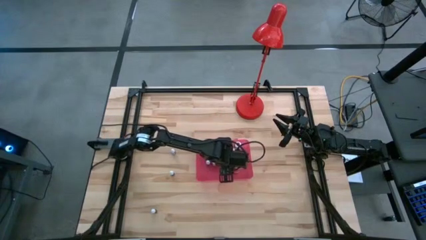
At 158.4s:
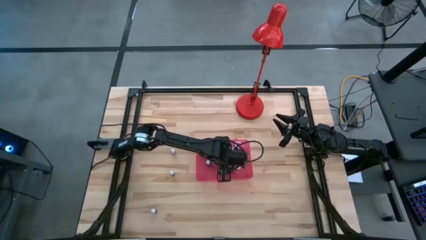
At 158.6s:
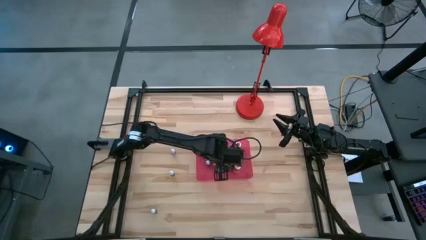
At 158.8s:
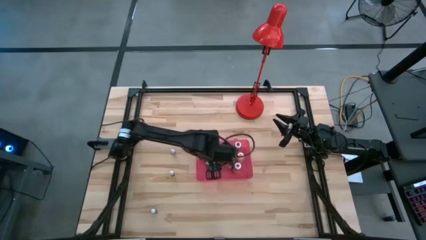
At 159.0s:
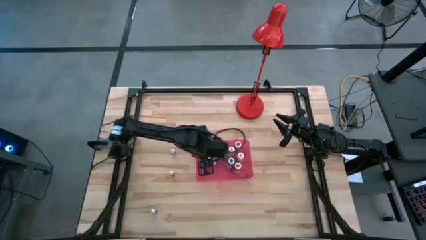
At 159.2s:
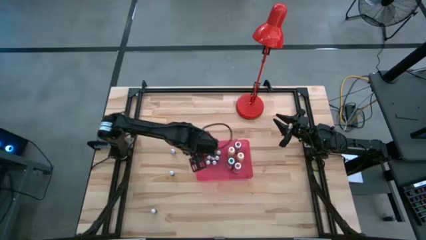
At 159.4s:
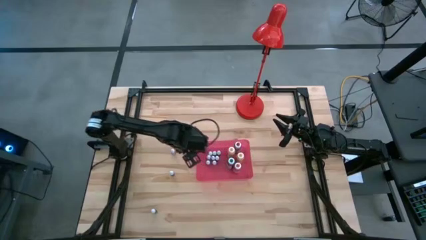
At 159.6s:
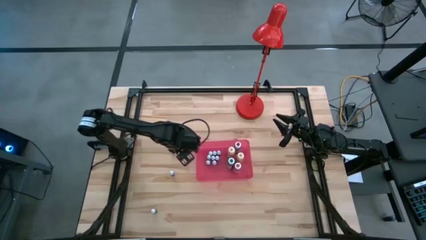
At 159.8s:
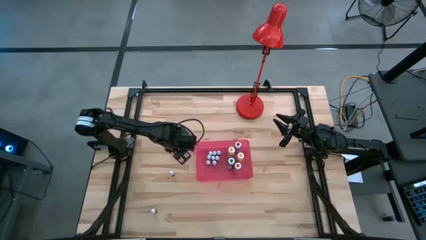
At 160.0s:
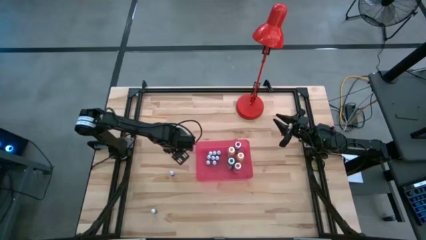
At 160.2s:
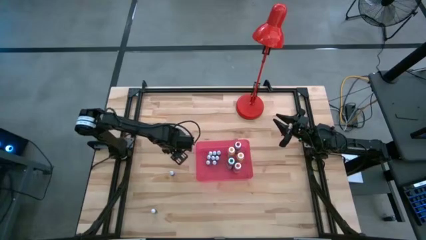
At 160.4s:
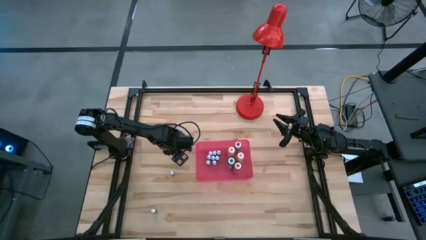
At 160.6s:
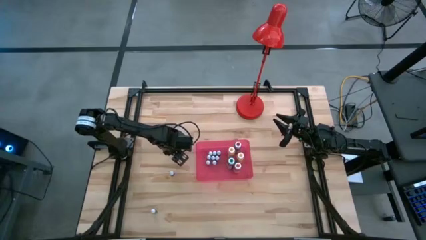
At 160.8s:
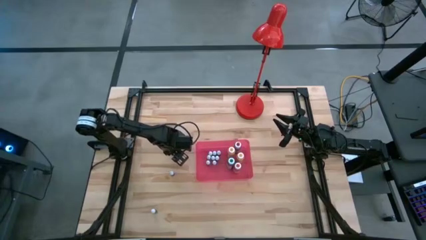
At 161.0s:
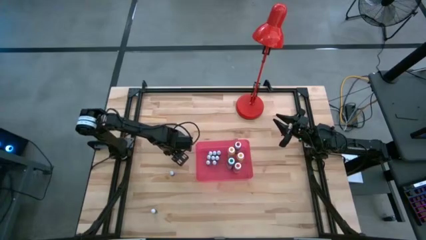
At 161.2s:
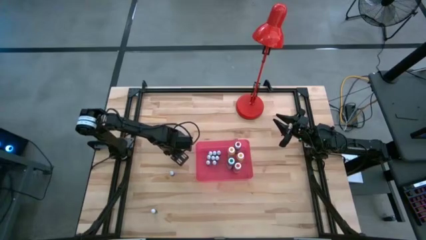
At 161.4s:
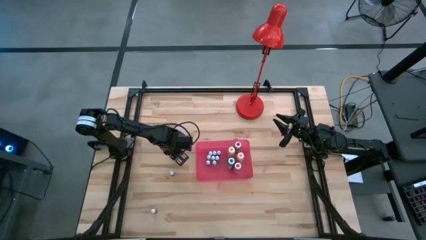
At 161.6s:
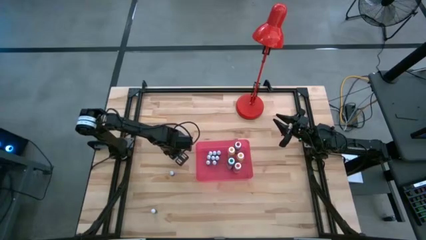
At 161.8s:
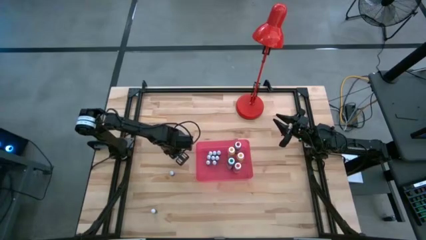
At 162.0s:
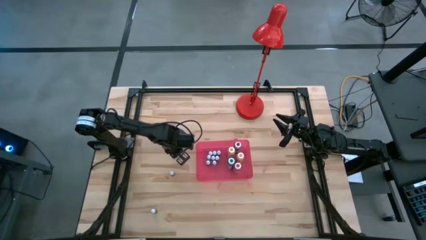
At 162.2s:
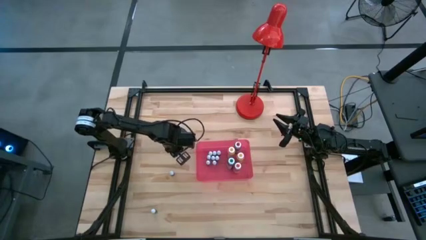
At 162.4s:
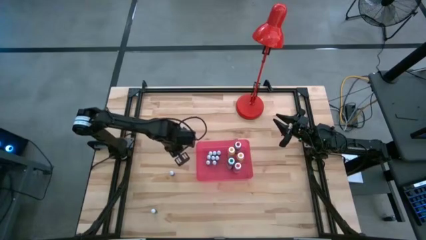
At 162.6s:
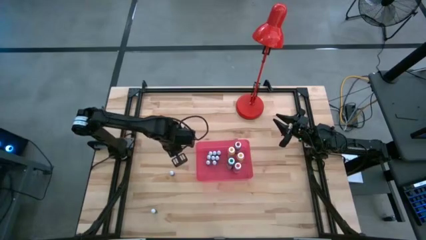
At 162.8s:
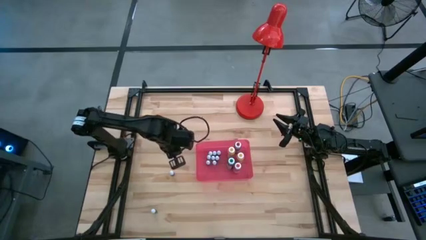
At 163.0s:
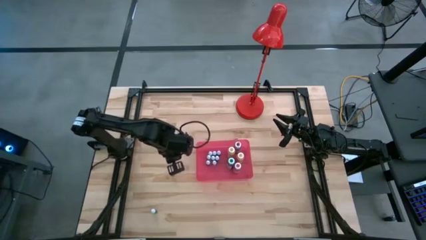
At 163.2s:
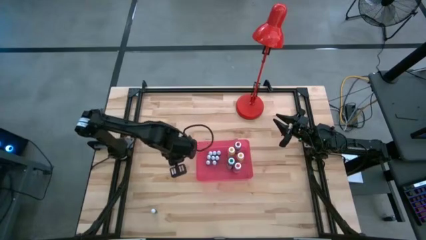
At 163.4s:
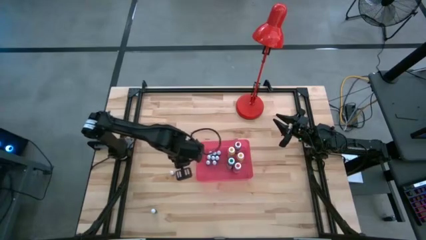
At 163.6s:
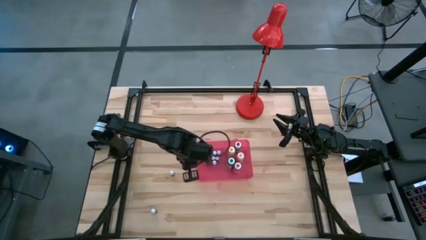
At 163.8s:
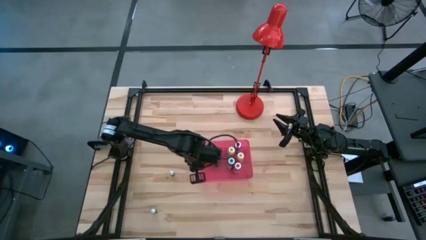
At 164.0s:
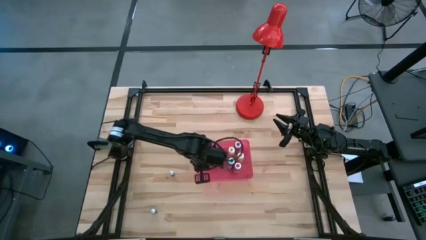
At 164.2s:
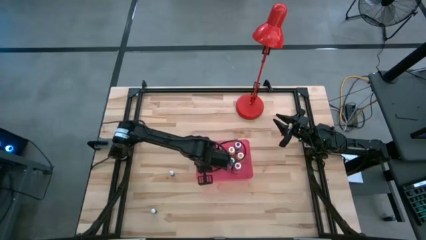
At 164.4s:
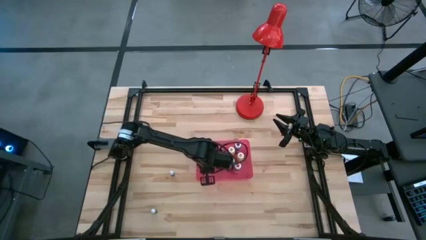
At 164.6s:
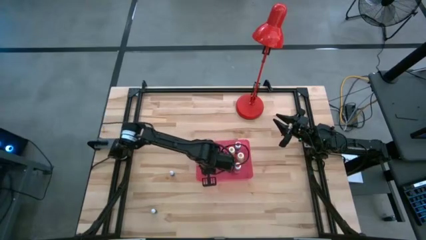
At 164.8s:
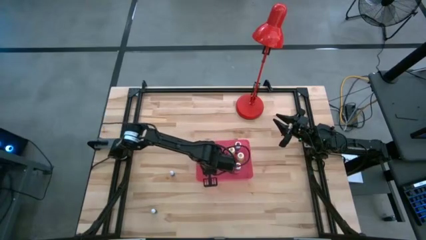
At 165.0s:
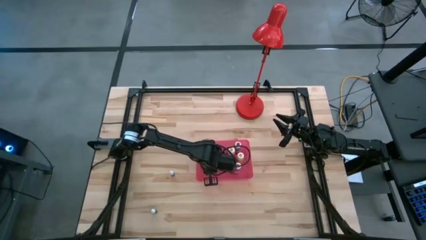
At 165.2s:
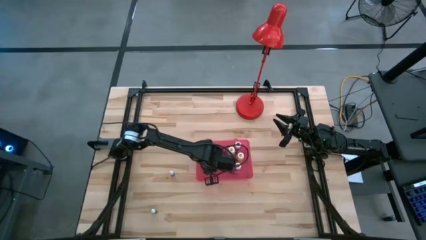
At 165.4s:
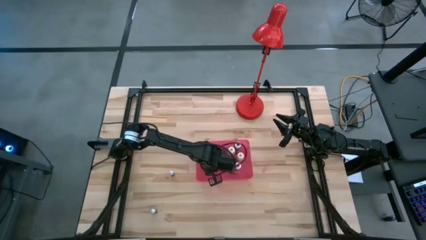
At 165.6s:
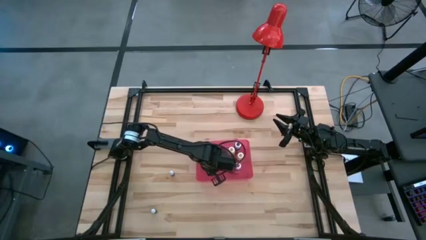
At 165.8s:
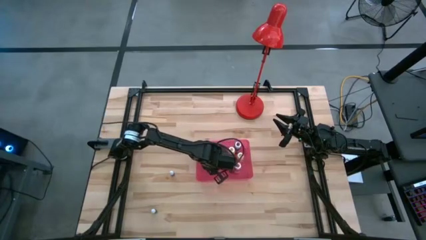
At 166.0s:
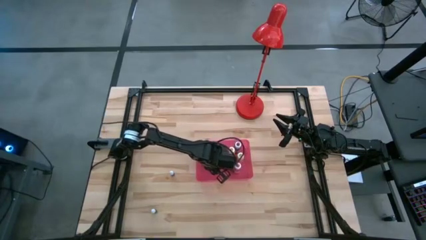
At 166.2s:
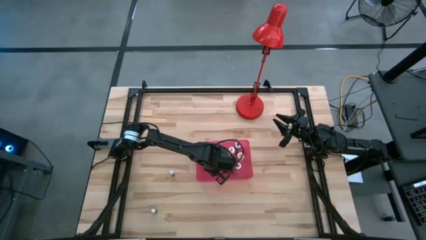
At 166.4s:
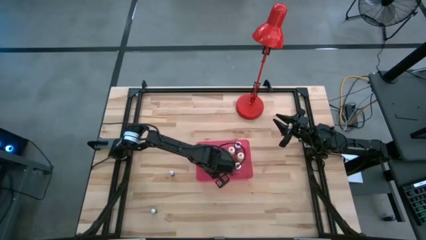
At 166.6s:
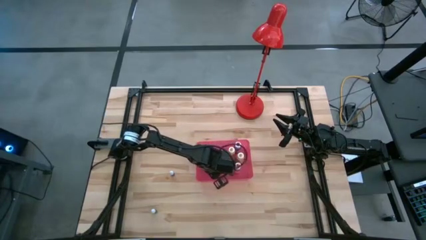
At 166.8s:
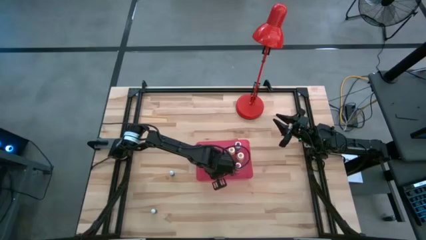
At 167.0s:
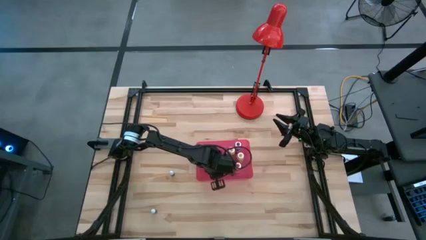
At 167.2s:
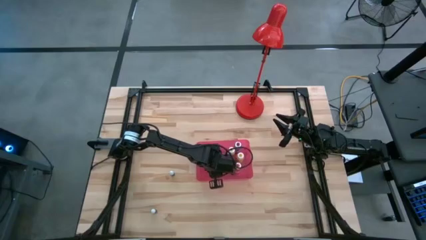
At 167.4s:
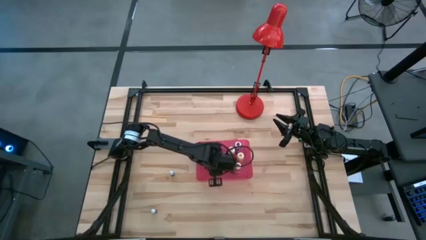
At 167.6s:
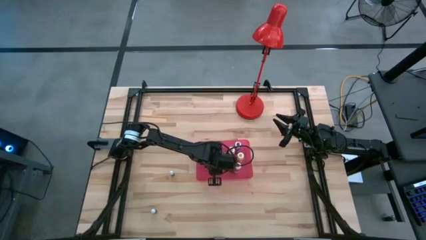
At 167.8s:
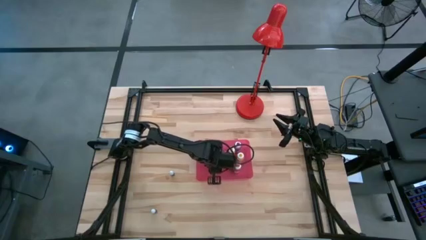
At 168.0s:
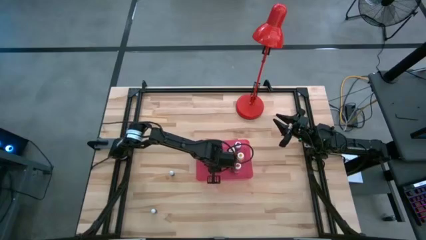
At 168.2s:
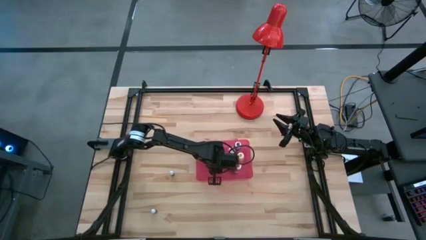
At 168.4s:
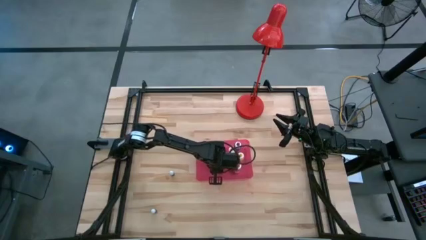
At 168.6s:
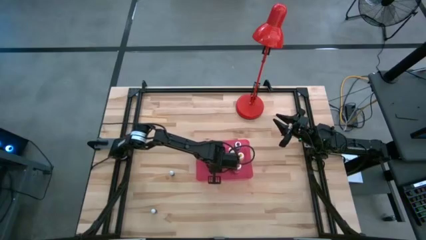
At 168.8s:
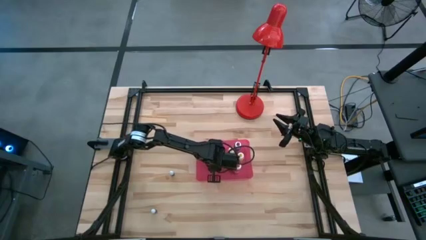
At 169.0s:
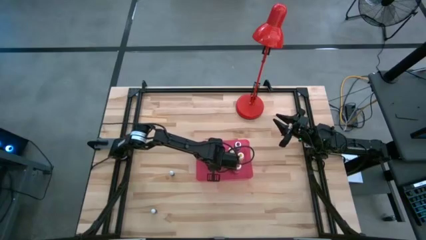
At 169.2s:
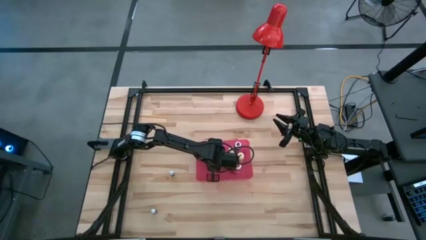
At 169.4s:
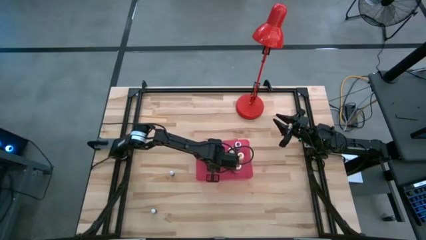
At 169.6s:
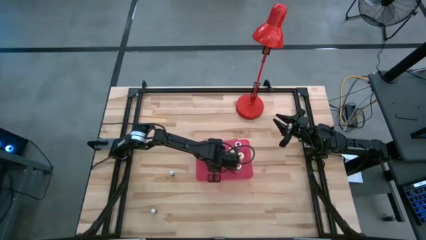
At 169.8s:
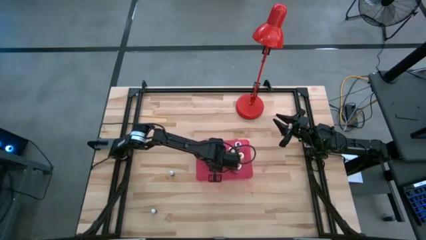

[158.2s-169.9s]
Task: Pick & Place food coloring
Put the small red food coloring bottle into the red bin

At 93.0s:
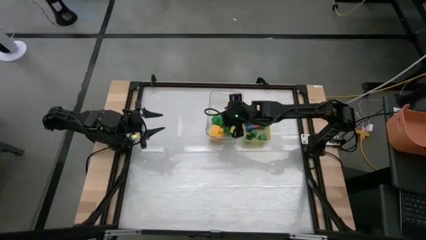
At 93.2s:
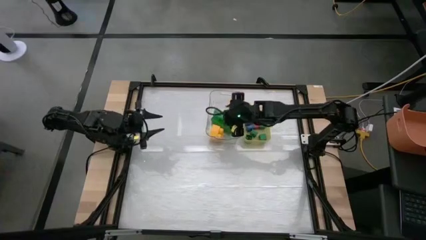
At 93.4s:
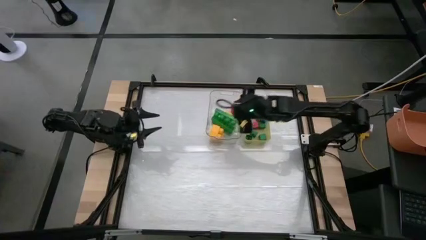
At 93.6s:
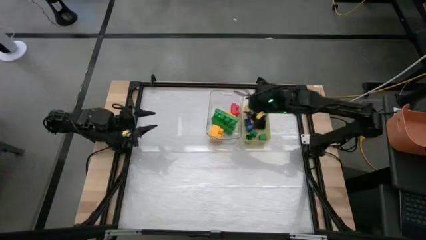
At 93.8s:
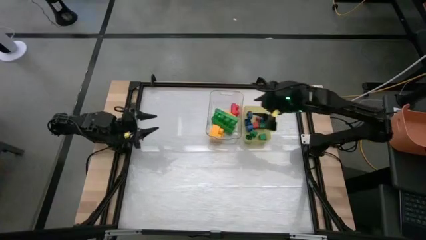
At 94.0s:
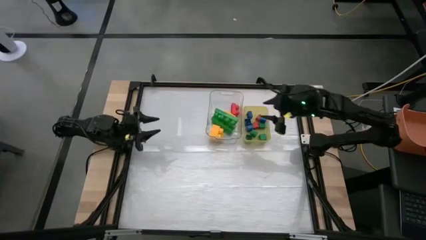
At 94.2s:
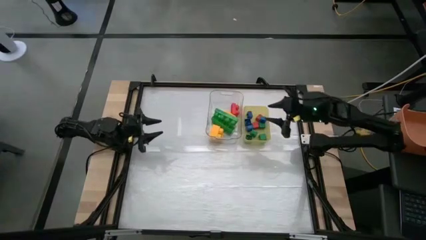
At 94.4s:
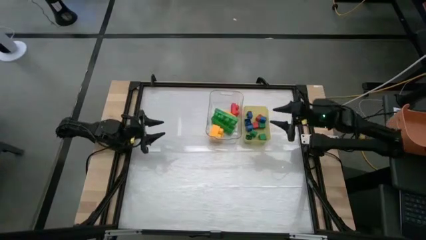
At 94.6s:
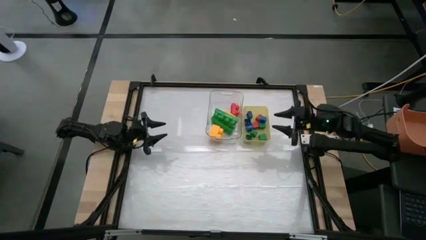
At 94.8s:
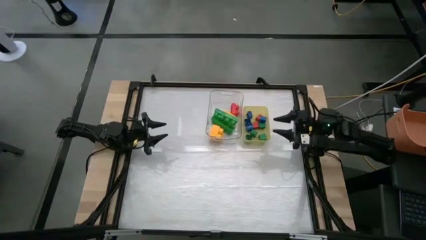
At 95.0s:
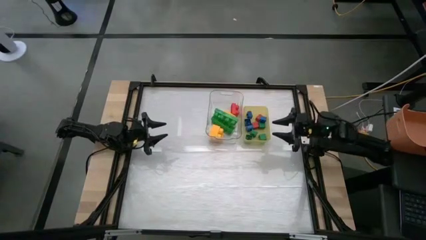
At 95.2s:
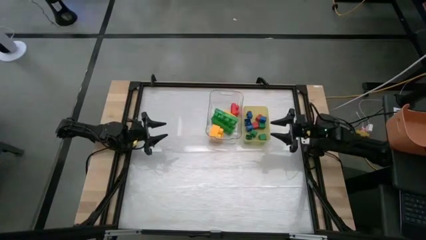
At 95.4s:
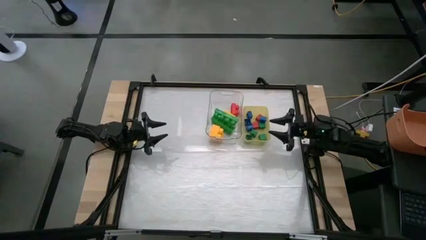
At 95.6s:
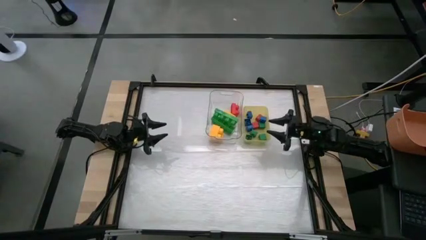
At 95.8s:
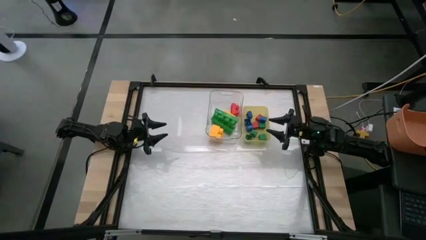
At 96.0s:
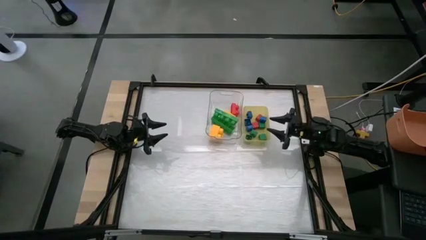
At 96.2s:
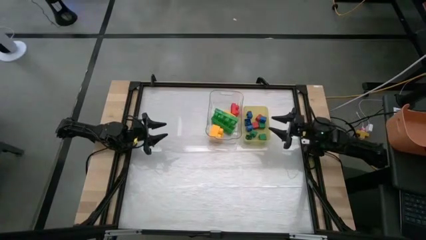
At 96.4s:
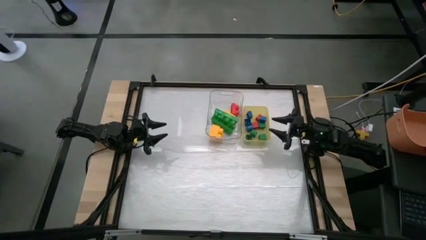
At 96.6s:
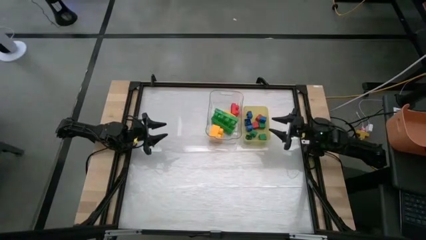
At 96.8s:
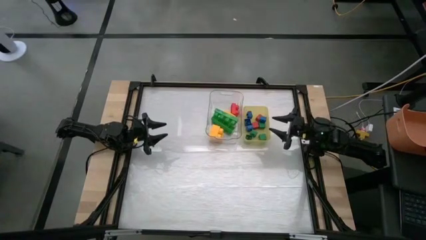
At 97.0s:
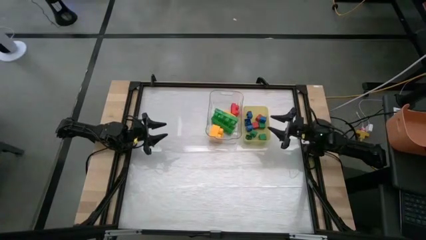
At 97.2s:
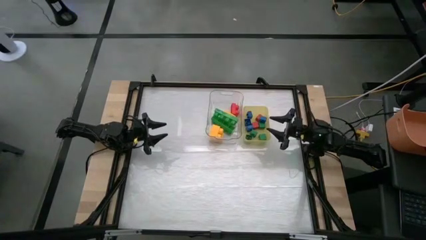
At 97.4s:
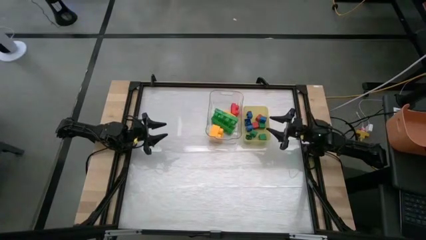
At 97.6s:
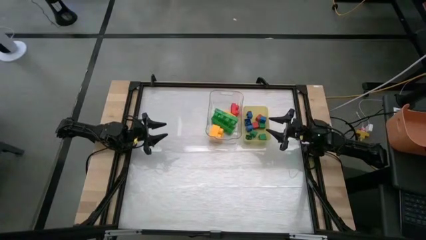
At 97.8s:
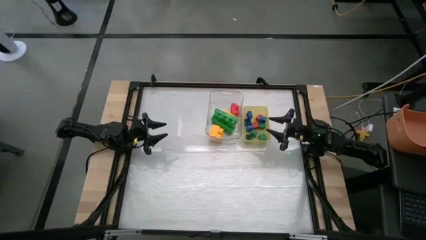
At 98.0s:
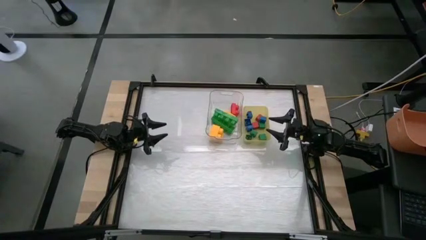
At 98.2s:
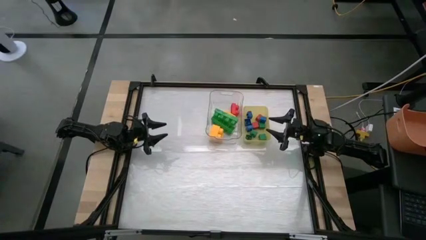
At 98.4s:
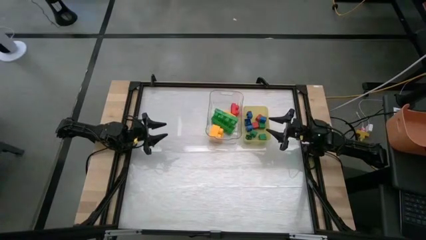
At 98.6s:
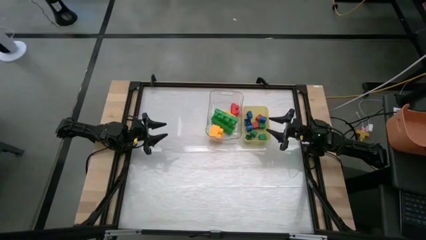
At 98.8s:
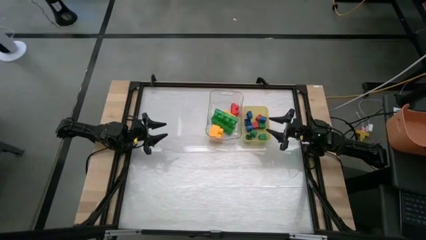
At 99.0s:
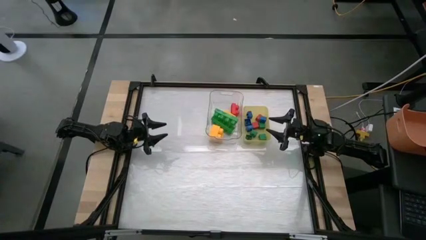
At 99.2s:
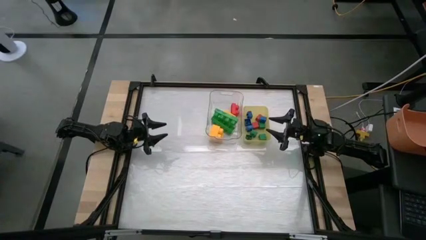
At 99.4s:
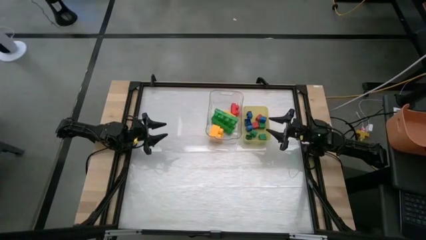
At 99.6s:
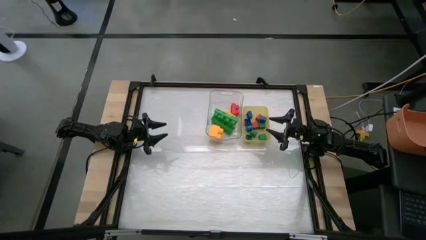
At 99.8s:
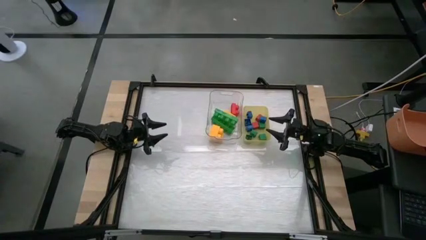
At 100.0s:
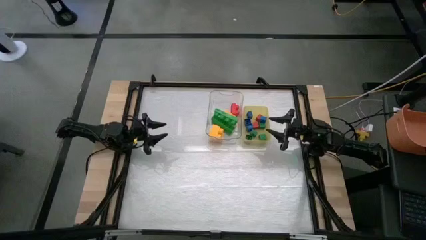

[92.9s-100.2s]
Task: Sort blocks by size
Return to Home Position
